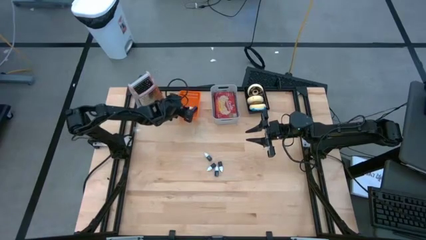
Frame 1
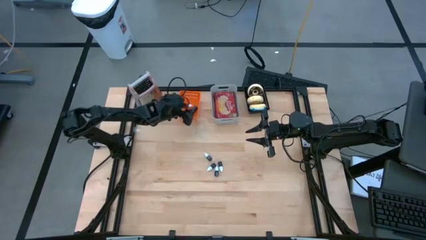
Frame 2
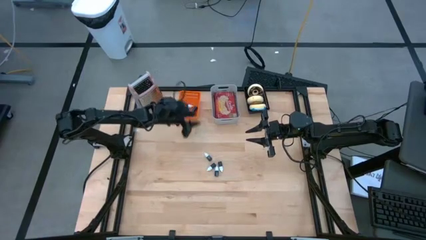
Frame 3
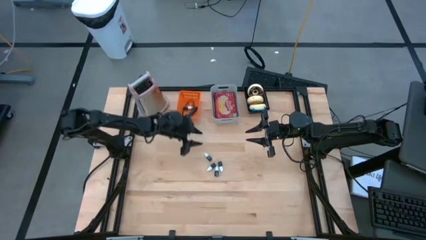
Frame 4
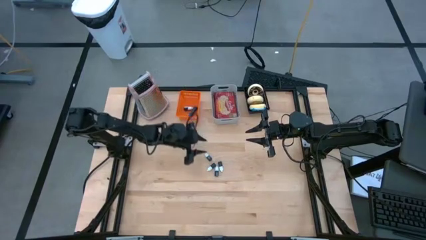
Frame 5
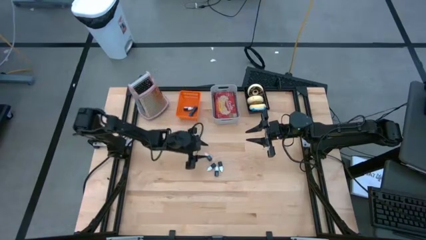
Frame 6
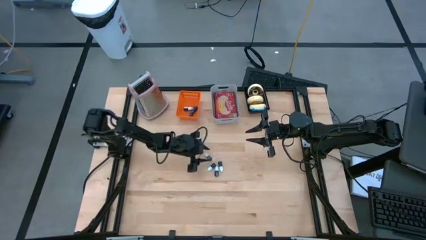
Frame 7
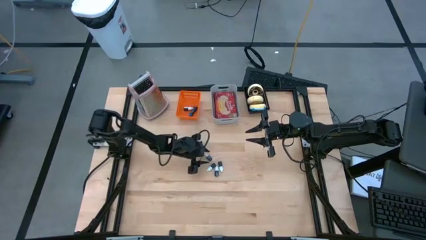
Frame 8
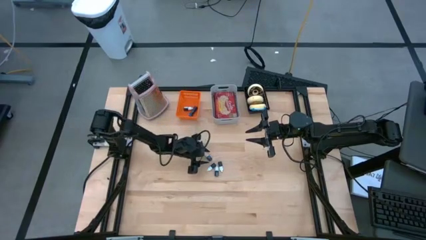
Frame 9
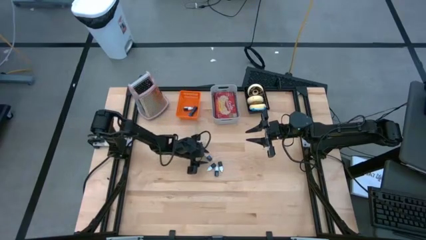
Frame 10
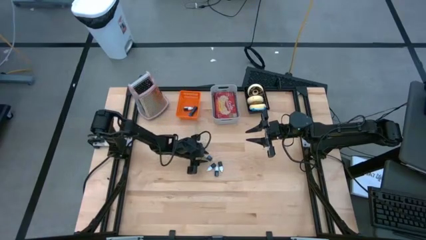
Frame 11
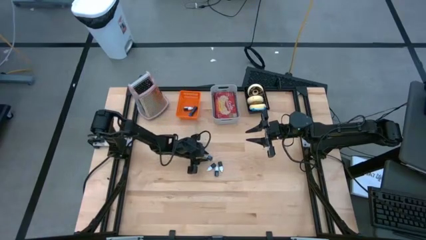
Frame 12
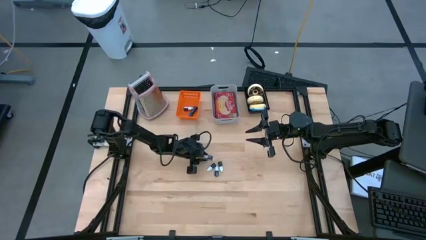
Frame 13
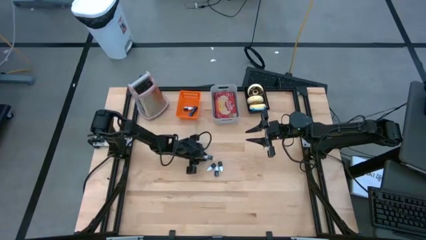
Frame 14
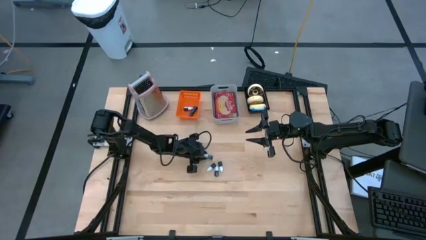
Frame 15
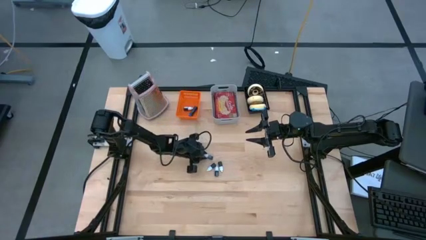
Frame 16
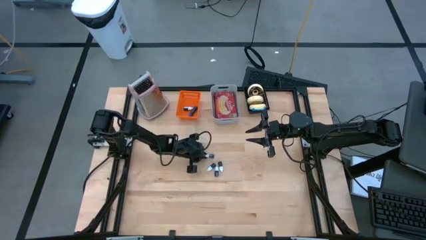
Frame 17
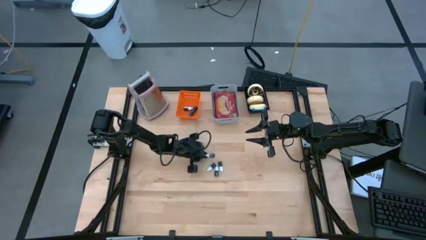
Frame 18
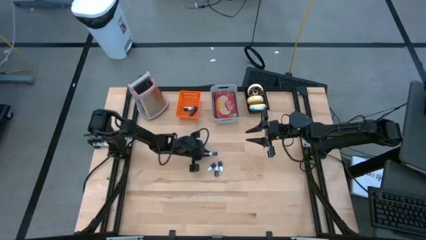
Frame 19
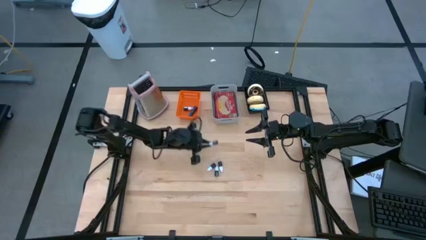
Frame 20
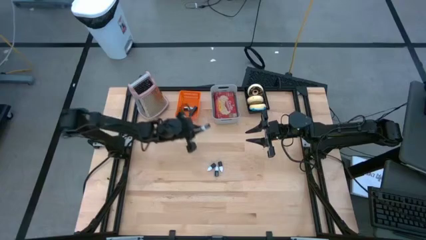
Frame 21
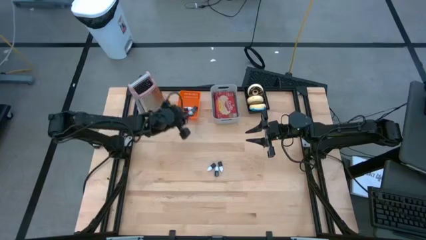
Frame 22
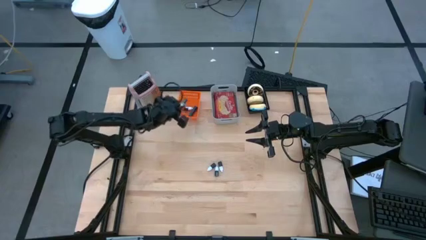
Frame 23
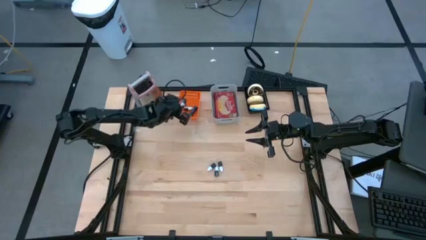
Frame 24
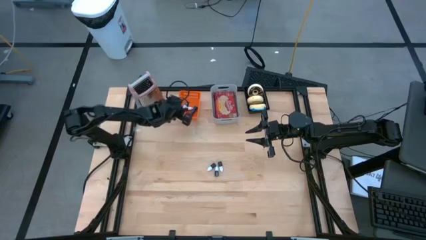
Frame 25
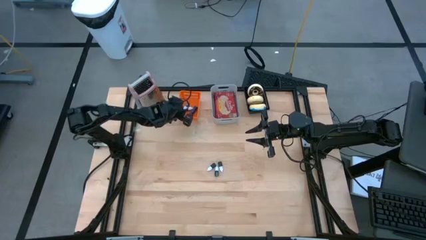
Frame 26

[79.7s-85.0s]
Put the food coloring bottle into the orange bin

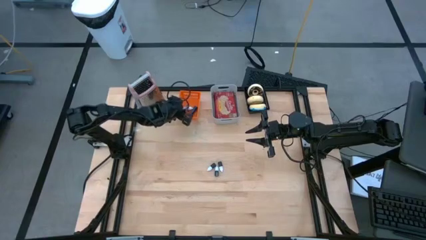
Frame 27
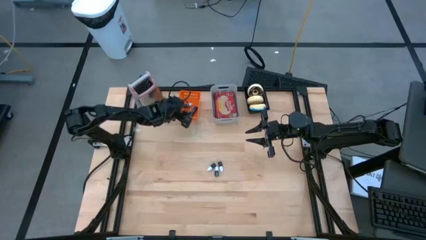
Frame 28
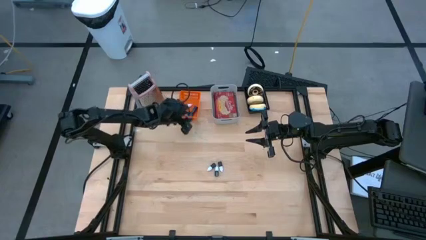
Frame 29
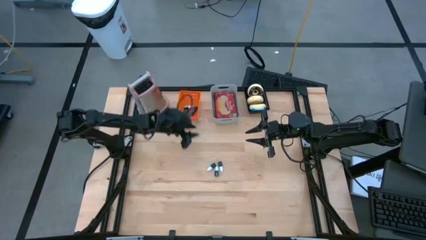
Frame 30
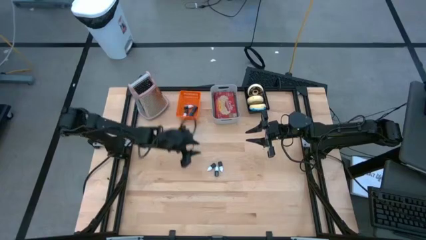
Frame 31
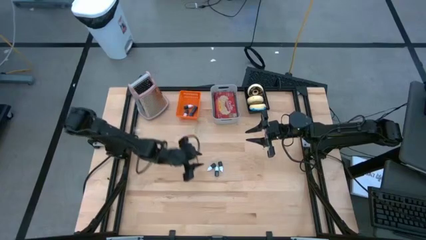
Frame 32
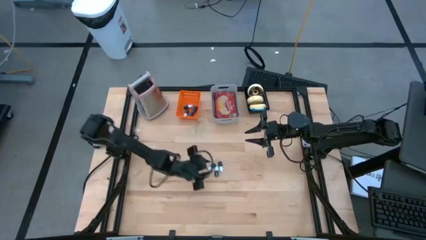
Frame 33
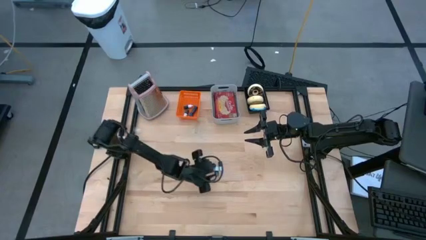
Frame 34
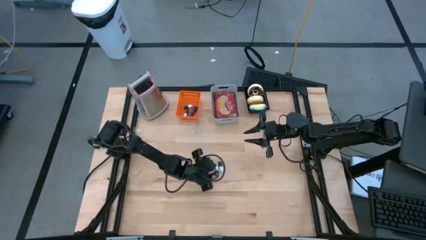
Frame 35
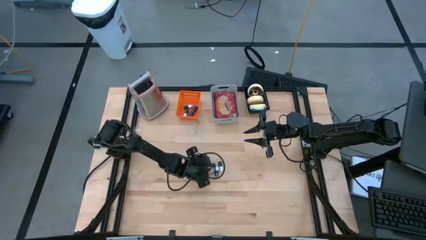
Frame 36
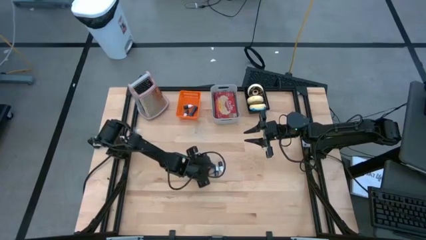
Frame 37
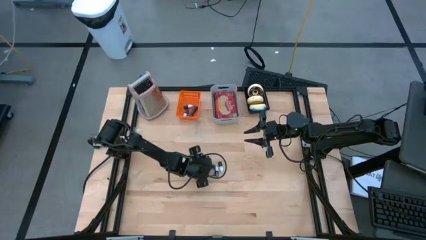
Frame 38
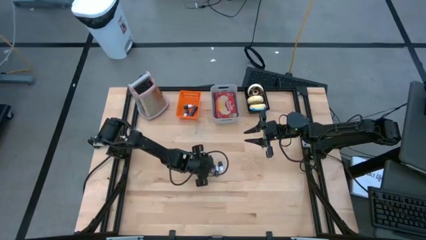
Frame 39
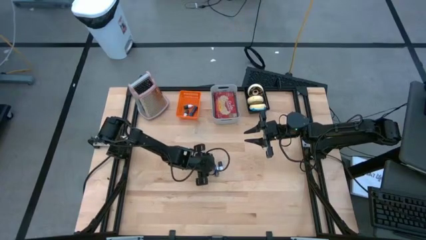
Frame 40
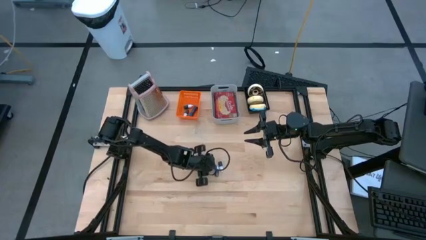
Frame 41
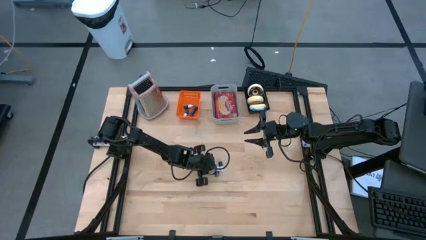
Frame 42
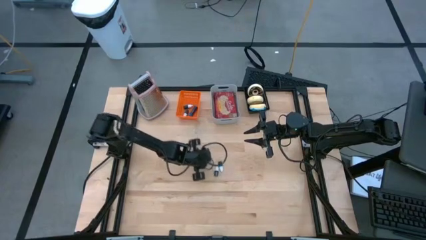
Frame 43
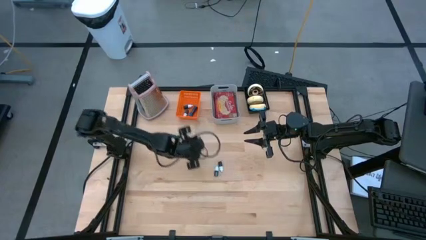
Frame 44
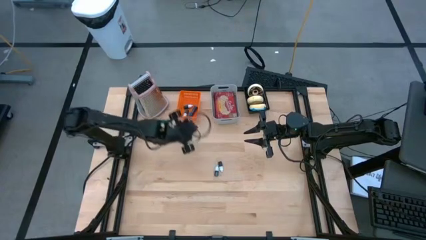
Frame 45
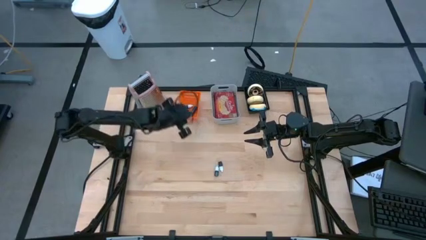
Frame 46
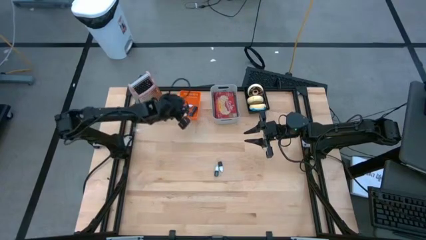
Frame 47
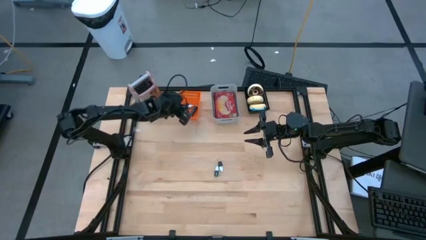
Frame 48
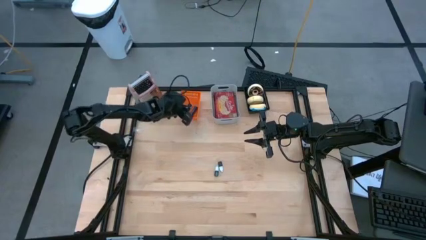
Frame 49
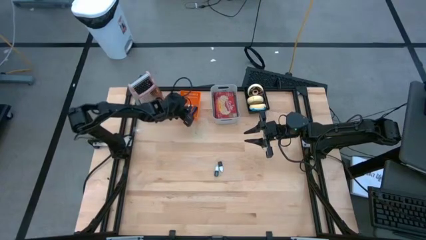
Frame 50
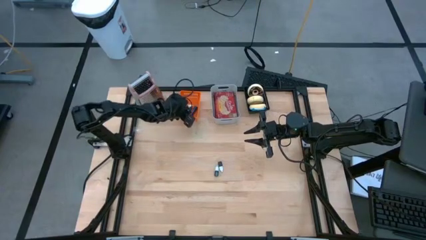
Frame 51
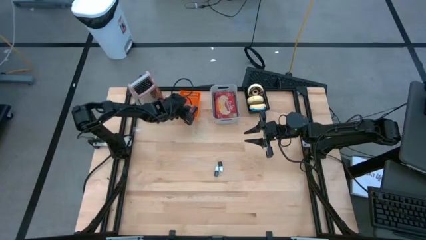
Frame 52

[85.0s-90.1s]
Put the left black food coloring bottle into the orange bin

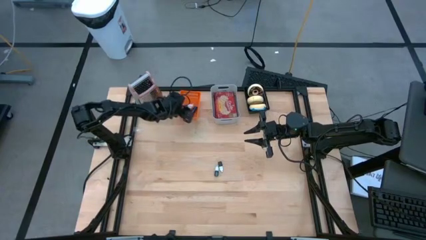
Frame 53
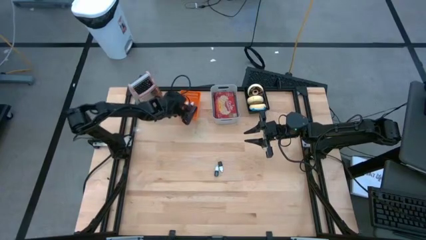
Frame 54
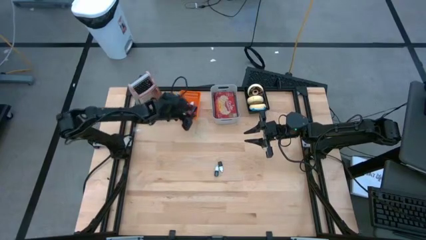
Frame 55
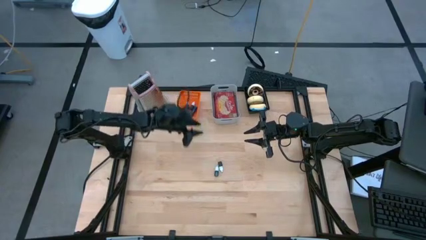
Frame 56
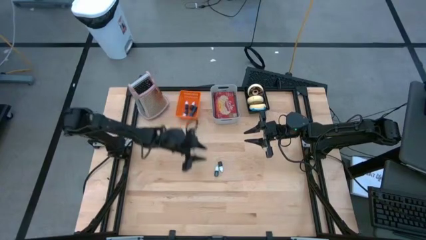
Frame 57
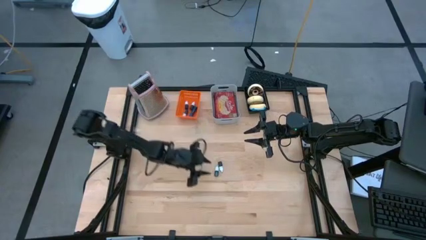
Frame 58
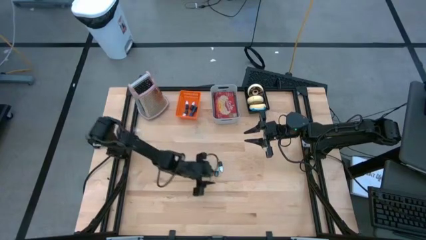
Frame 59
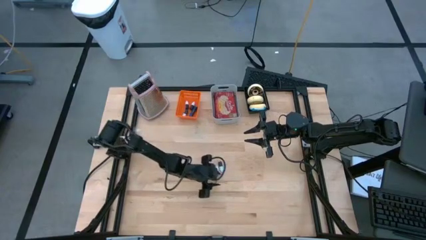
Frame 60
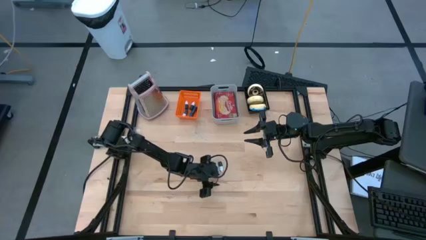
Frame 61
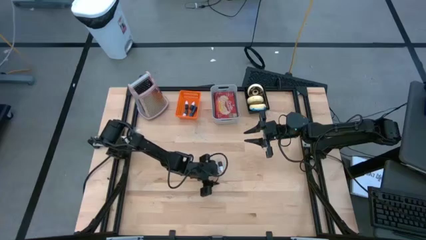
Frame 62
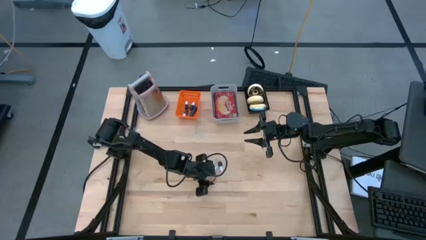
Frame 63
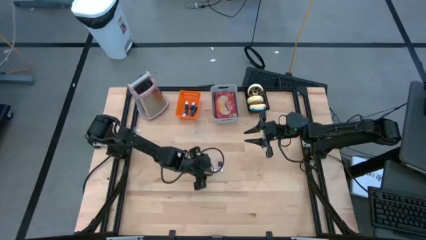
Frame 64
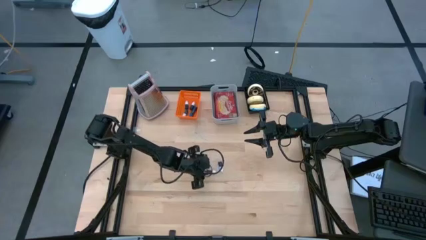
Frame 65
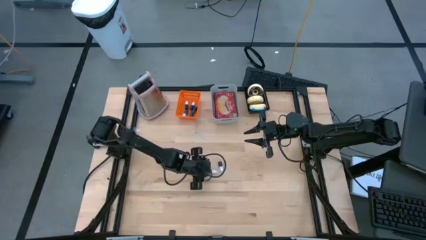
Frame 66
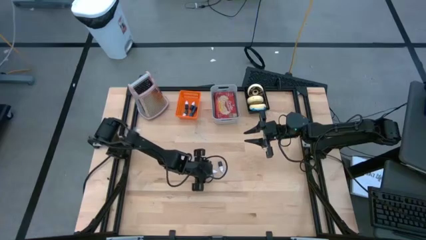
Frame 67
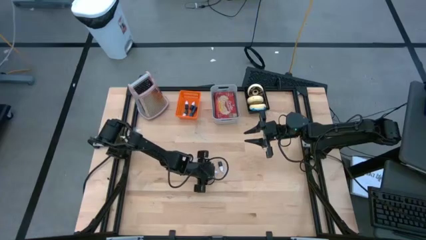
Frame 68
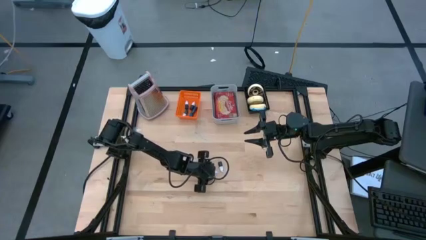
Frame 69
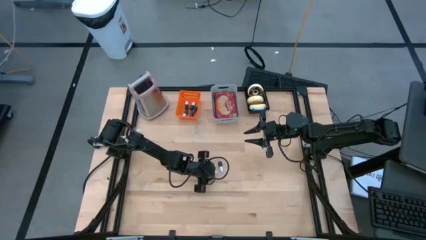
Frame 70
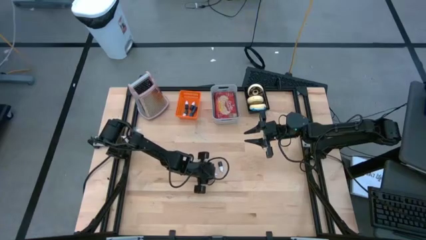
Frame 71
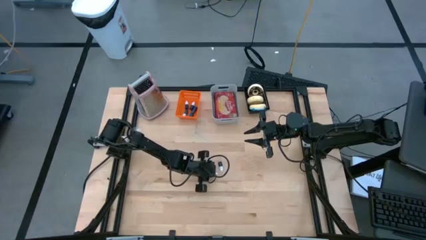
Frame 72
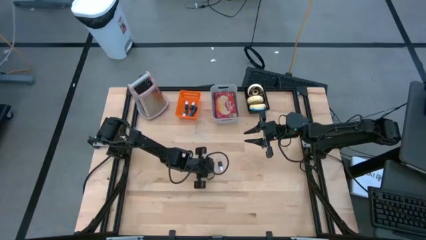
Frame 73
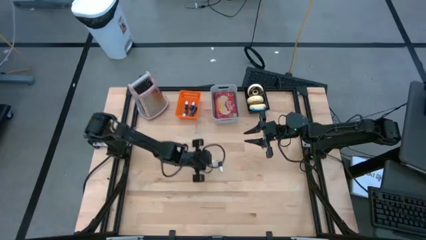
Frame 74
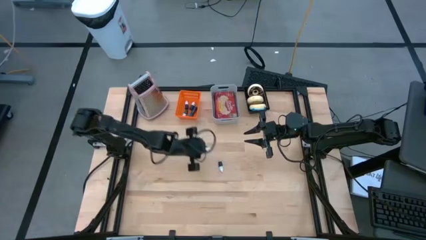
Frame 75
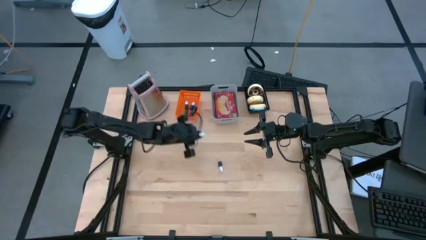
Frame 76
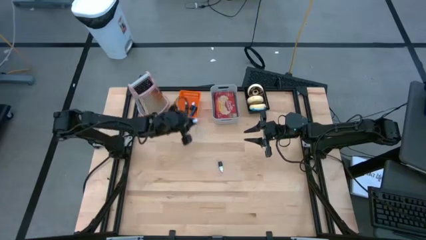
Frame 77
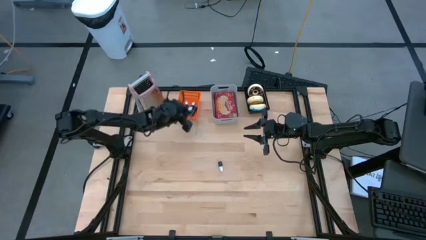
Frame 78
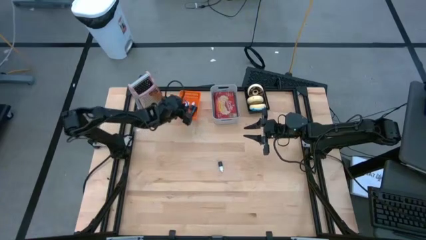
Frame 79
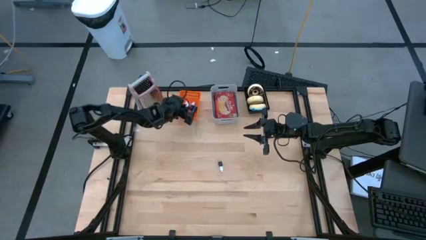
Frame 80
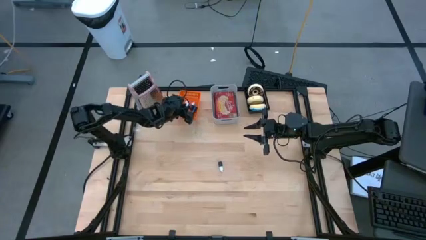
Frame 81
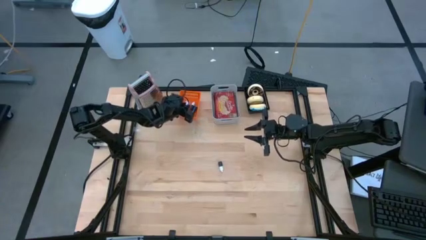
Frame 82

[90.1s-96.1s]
Put the black food coloring bottle into the orange bin
